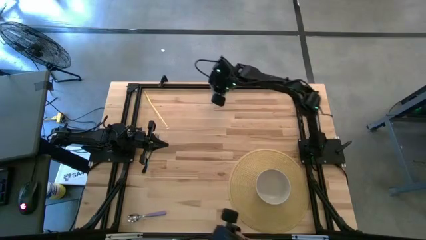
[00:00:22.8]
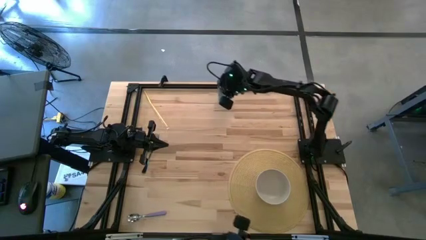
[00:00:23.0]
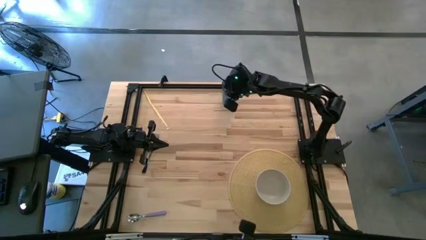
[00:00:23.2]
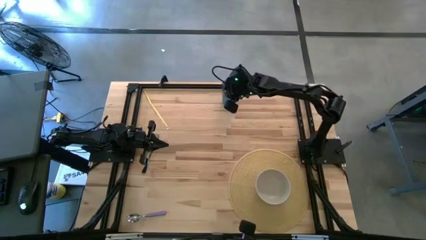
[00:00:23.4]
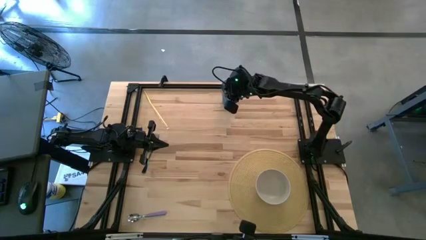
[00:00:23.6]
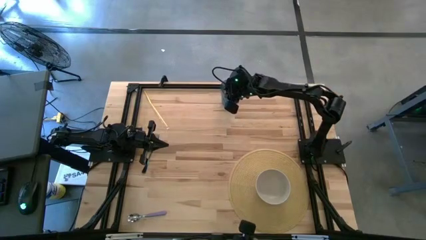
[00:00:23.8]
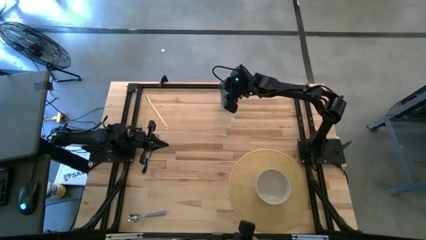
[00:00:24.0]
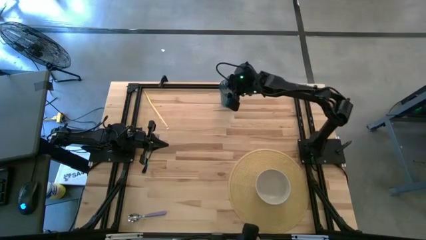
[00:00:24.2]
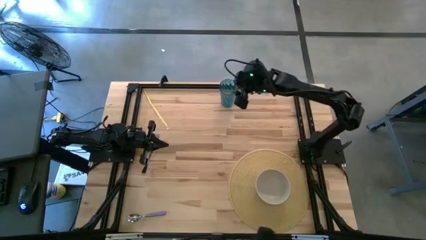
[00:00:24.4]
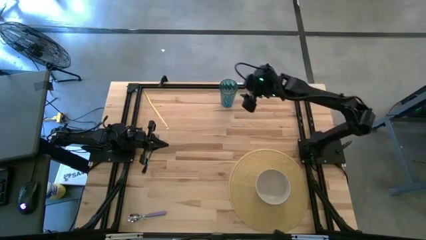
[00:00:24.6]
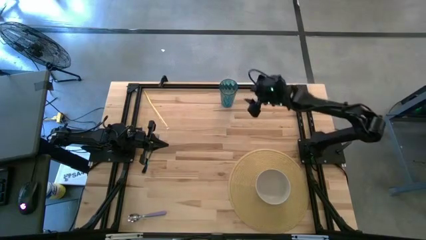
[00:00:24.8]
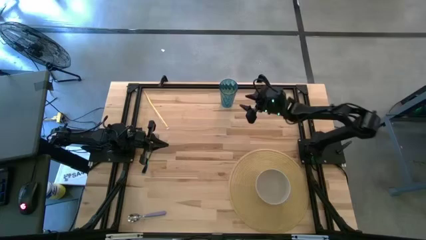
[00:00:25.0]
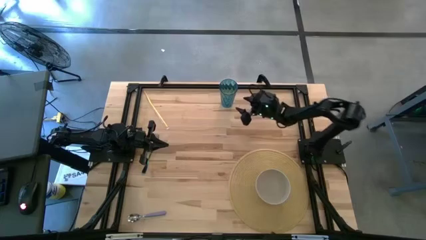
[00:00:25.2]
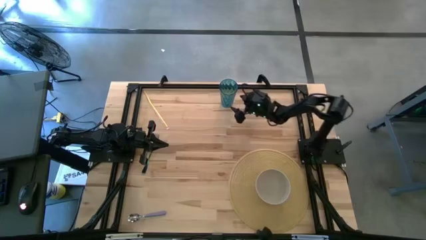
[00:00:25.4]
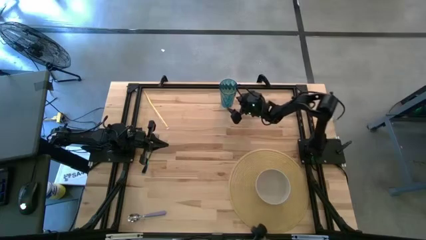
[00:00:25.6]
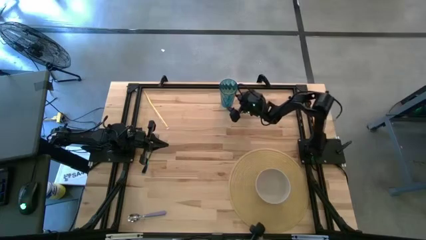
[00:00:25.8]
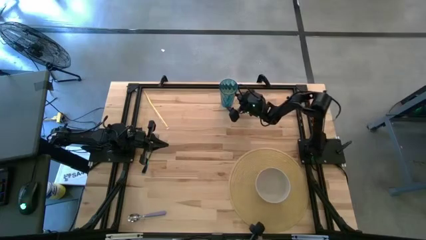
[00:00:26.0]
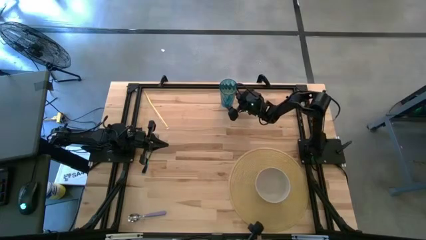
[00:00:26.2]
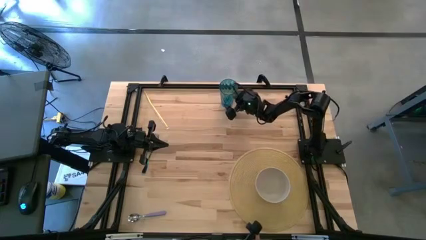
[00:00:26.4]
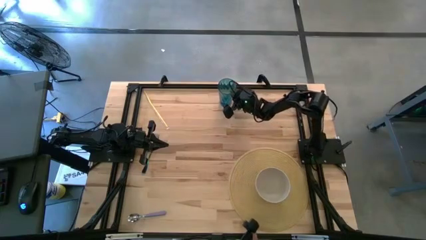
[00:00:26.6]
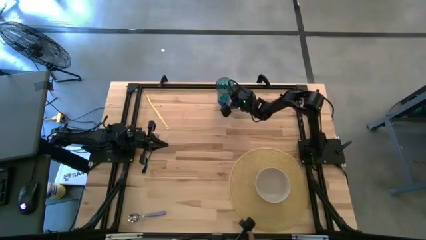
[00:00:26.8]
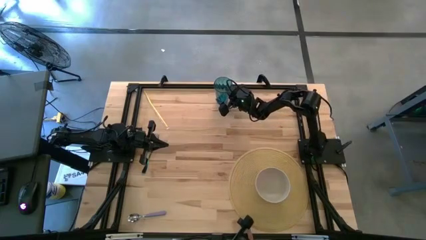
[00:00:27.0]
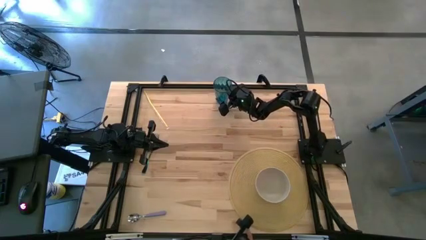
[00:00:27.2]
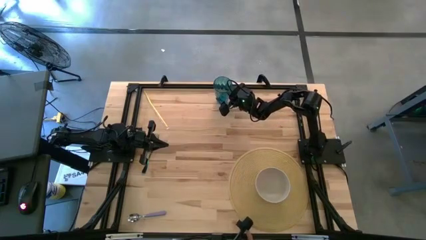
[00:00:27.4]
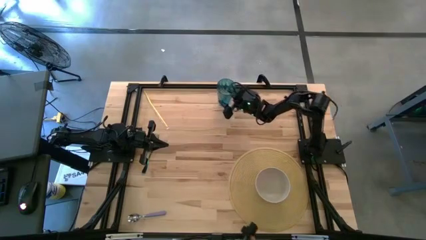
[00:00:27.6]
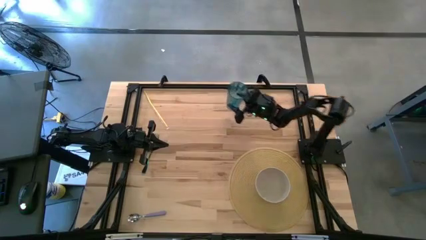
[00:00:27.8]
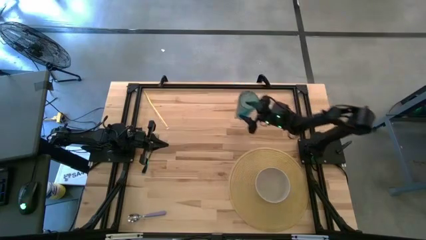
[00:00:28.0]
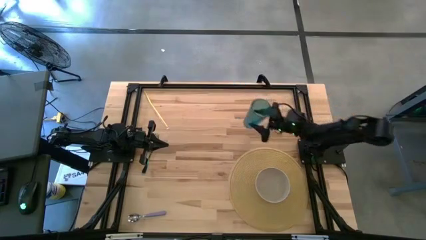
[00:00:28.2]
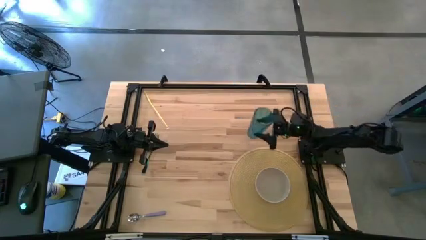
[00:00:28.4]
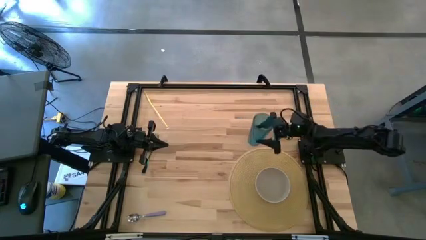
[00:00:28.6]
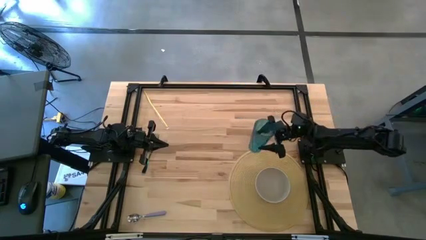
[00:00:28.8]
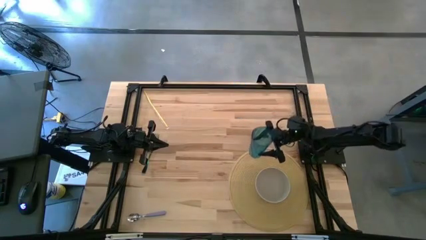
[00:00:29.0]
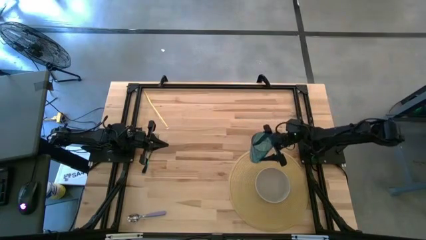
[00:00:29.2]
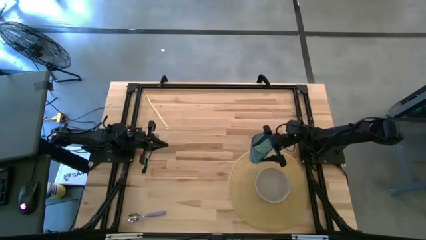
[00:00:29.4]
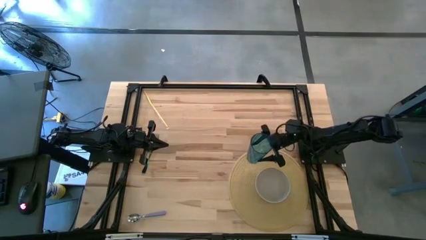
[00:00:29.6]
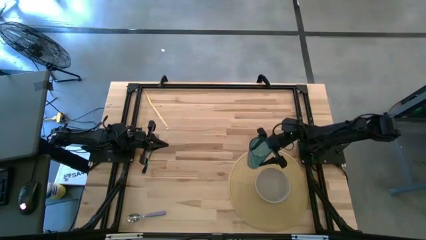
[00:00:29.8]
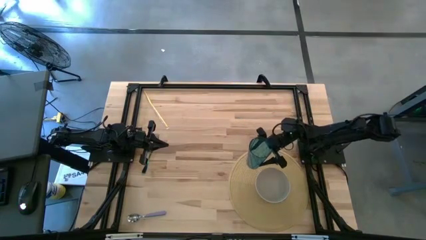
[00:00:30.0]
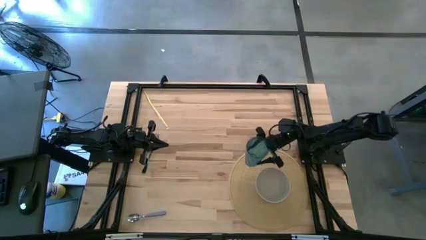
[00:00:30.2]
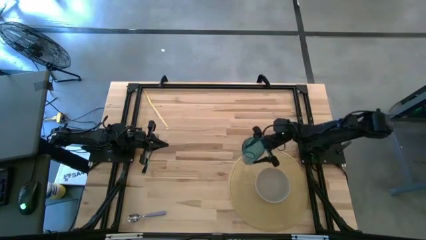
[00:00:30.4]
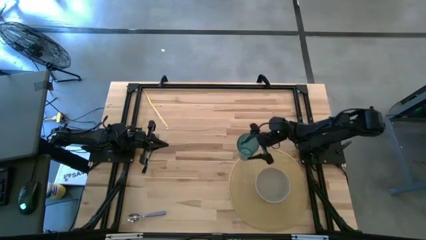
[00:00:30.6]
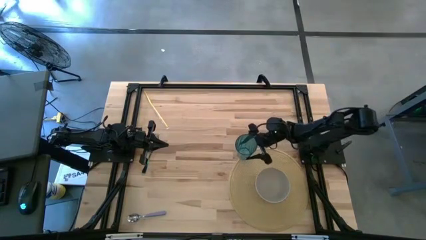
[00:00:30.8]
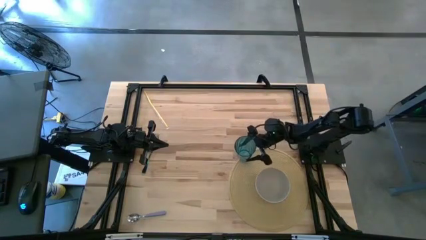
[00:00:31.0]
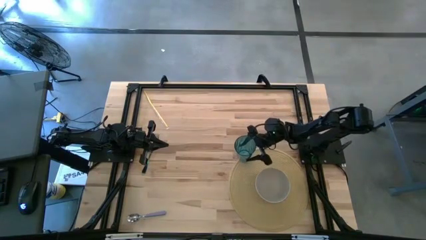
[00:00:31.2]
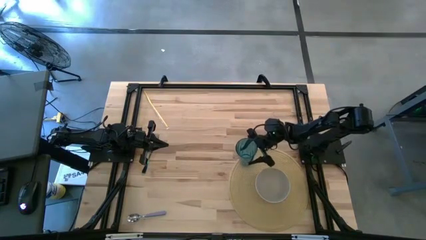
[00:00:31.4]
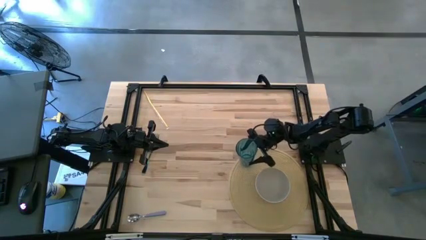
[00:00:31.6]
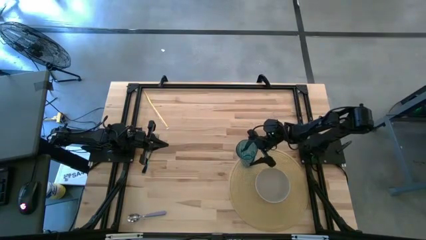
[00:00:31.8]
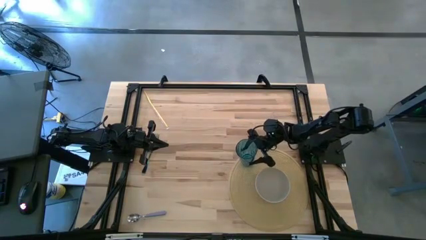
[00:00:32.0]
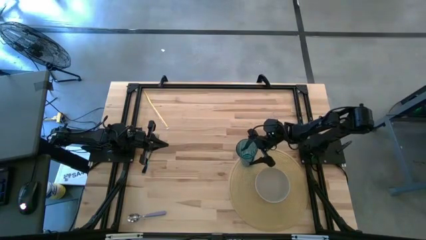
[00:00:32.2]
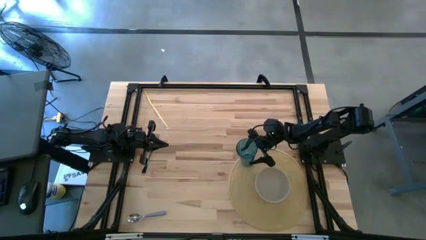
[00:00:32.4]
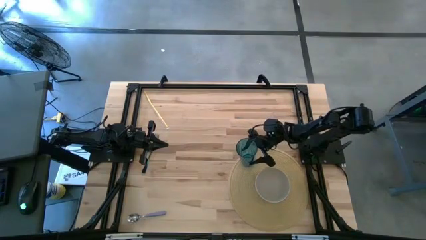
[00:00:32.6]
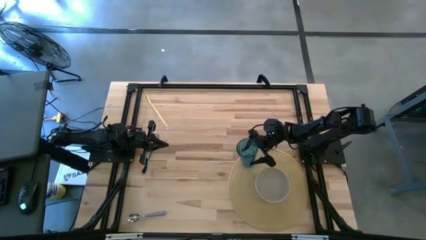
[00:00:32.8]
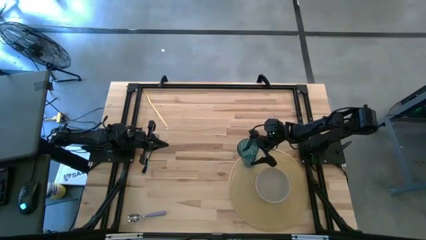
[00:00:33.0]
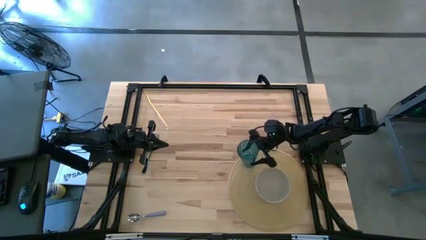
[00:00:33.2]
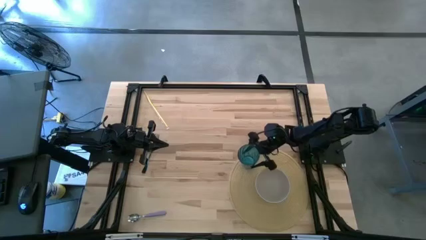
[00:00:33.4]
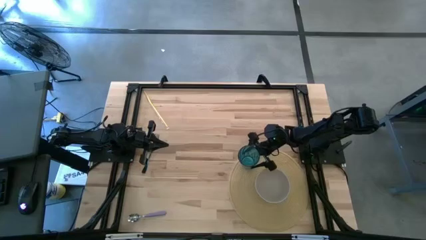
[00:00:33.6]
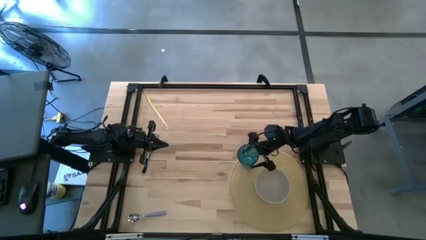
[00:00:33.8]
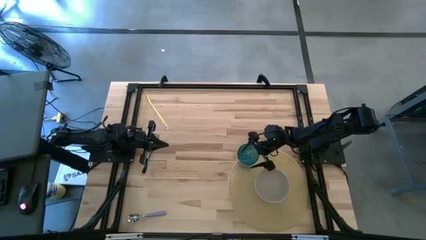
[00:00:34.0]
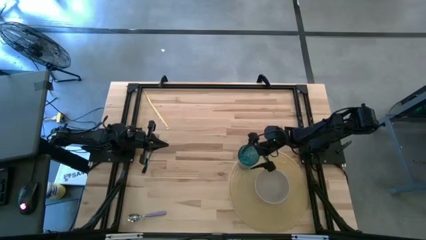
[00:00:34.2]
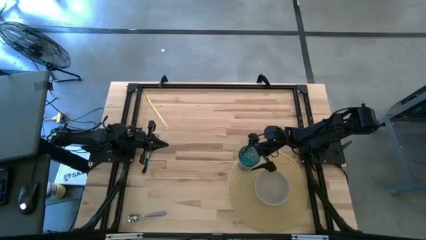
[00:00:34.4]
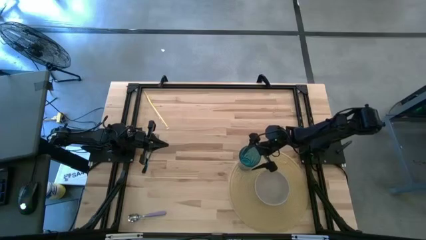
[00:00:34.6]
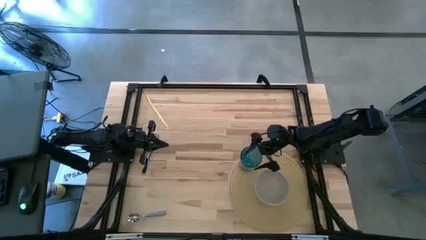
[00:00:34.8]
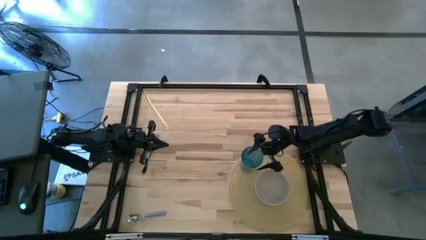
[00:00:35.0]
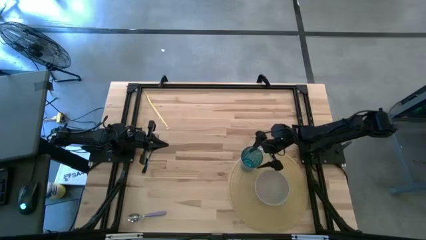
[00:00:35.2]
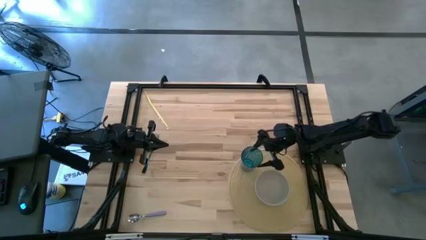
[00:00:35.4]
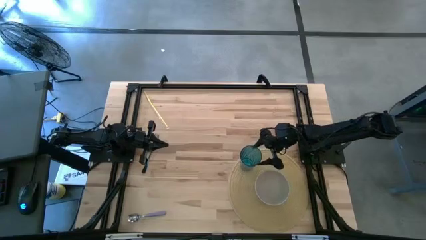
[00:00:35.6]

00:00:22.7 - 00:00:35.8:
Task: Pick & Place Utensil
Put the blue cup on the brown mat to the top left of the white bowl

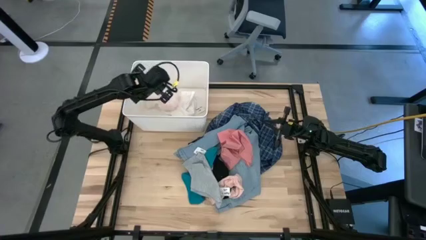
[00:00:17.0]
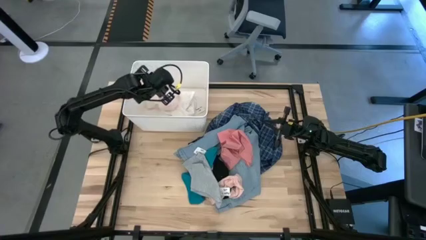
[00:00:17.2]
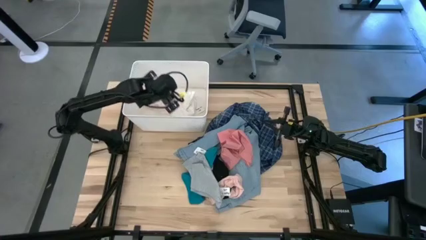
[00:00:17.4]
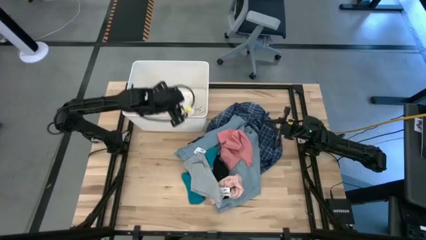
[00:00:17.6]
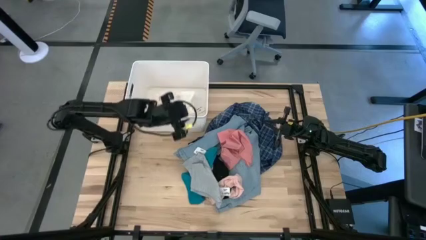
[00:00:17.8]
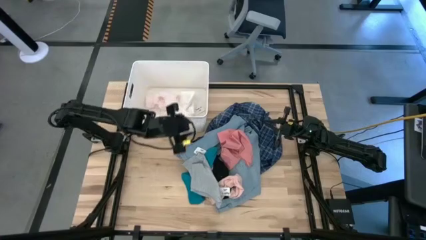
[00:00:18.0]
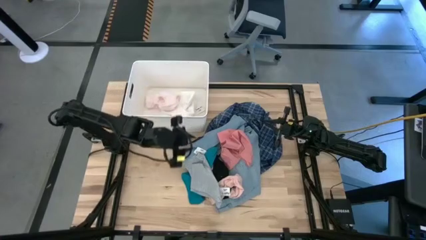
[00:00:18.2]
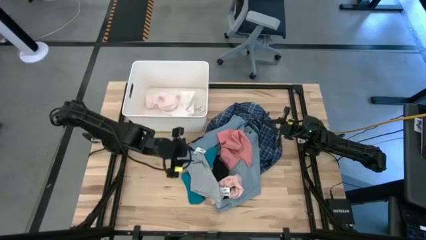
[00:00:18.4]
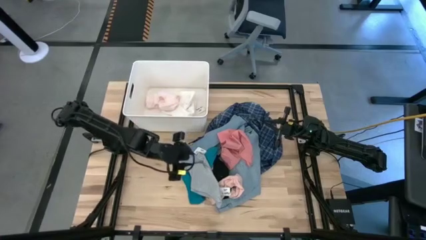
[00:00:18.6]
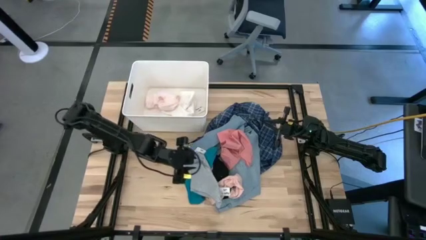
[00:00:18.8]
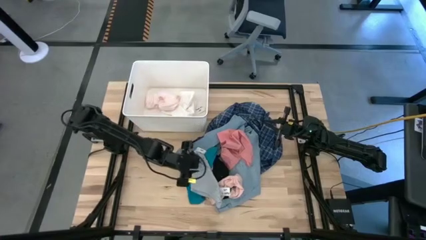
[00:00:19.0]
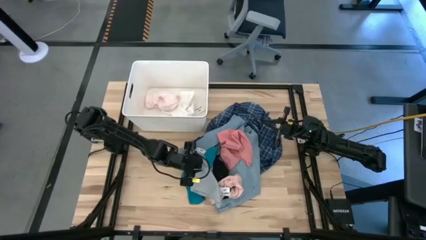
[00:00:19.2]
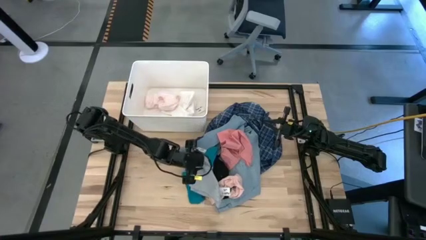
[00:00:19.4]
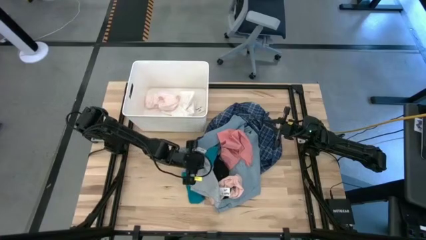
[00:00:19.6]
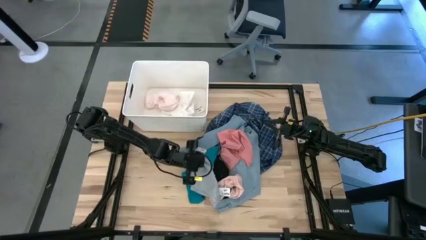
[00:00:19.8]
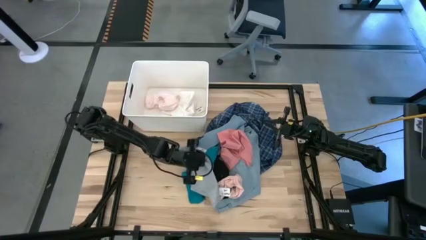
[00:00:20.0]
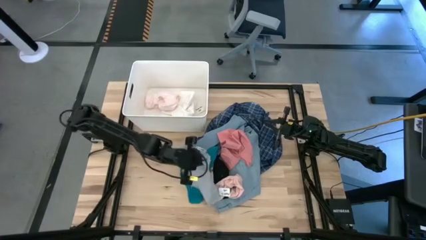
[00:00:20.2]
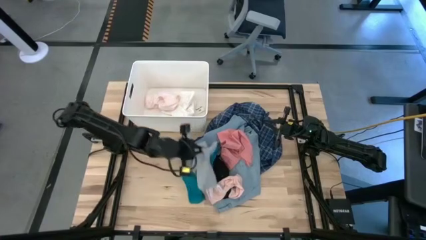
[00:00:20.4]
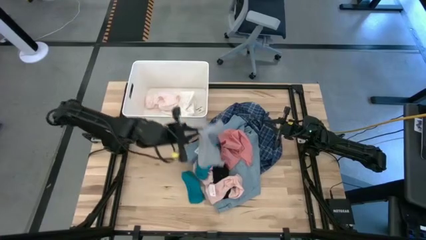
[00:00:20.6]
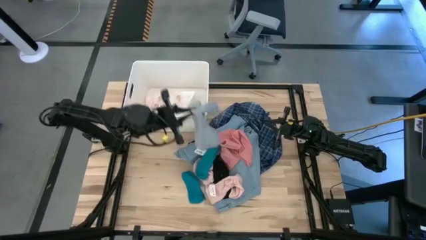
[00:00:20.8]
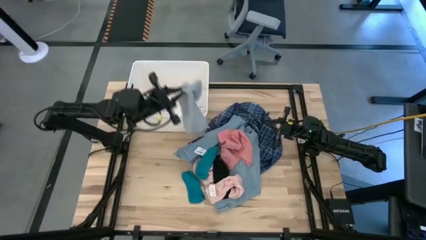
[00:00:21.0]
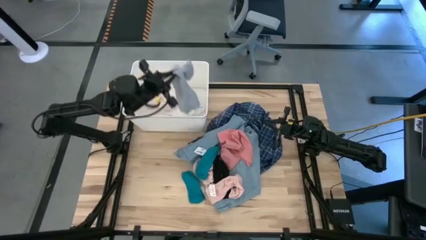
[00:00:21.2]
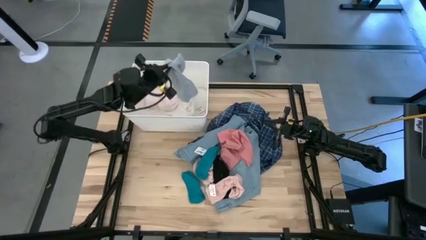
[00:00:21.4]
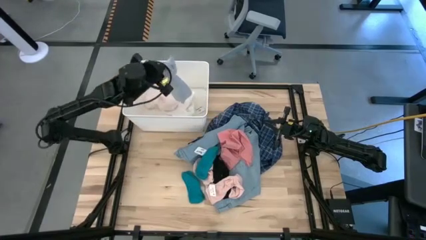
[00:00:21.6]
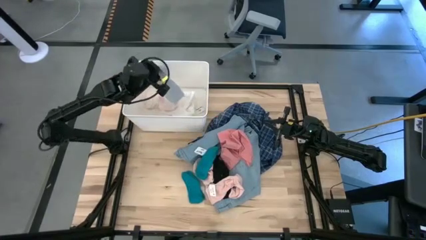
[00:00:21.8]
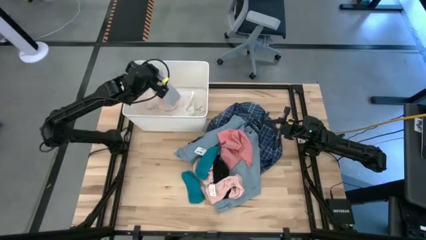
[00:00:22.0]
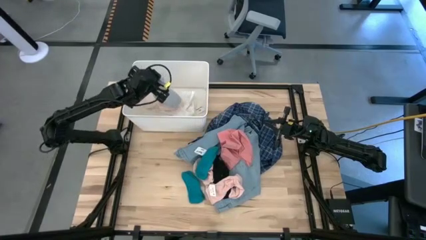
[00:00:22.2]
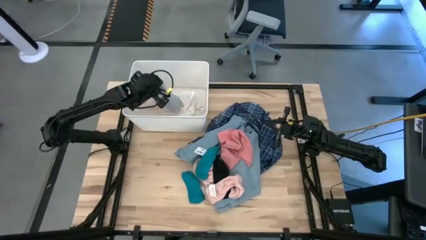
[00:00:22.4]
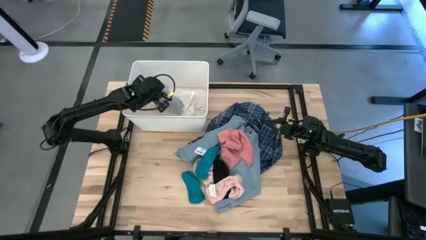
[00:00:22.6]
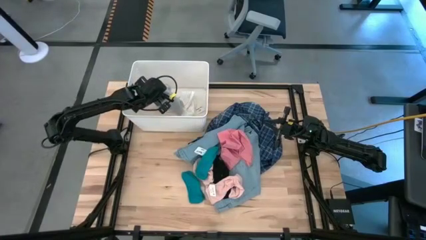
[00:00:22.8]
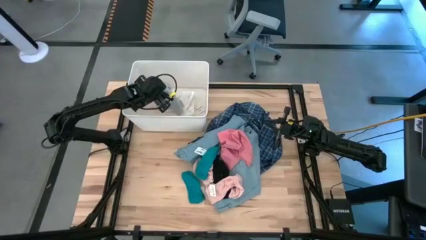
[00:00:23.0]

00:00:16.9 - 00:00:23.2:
Task: Sort clothes
Put the gray underwear into the white laundry bin
